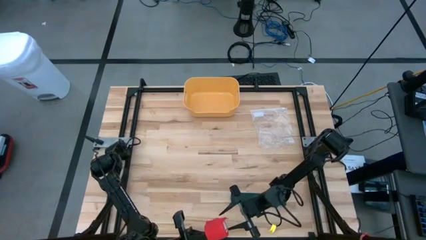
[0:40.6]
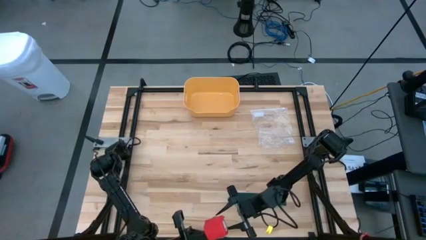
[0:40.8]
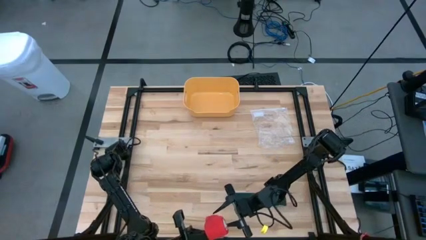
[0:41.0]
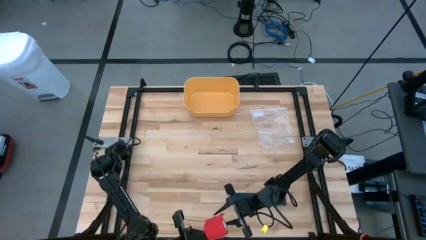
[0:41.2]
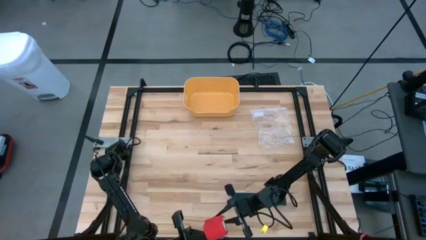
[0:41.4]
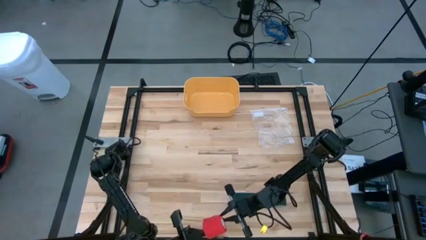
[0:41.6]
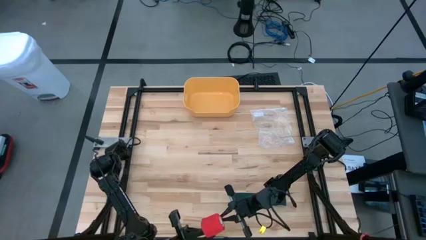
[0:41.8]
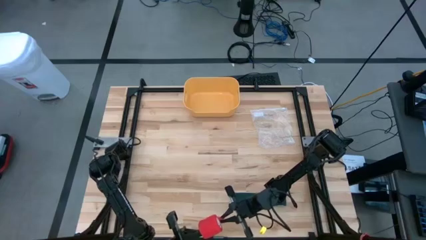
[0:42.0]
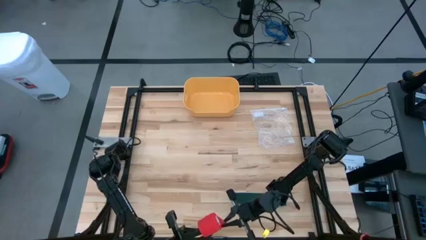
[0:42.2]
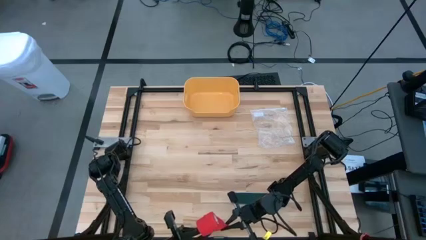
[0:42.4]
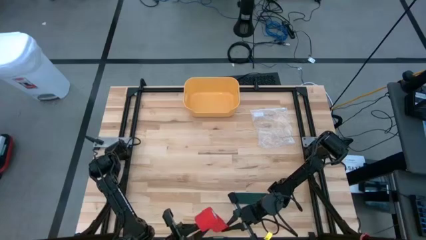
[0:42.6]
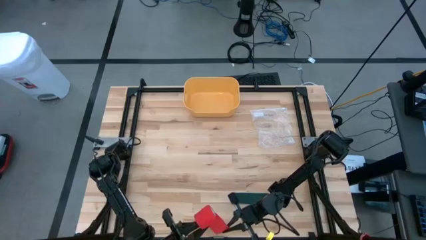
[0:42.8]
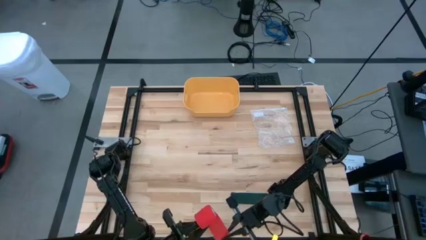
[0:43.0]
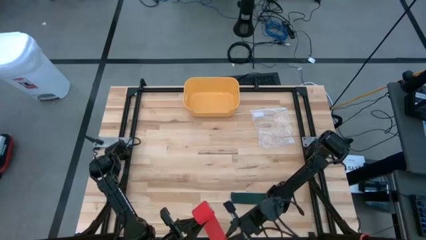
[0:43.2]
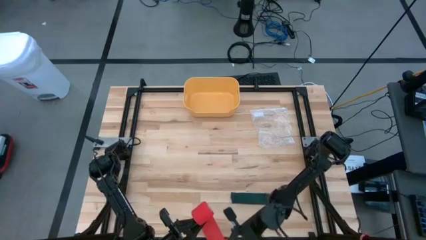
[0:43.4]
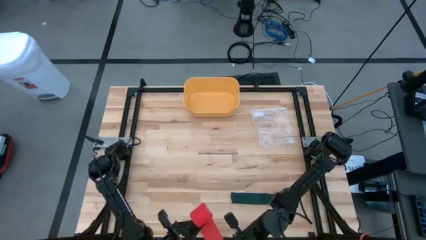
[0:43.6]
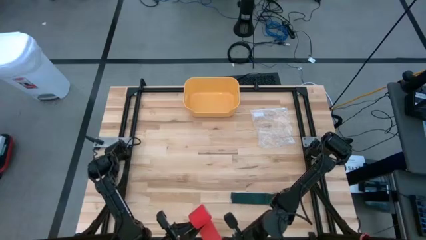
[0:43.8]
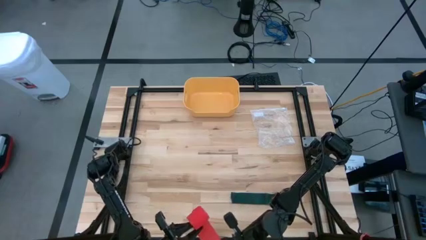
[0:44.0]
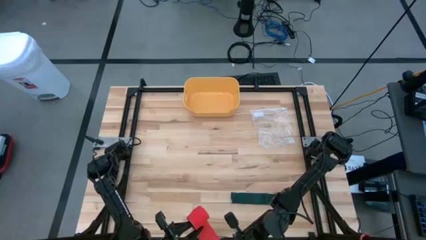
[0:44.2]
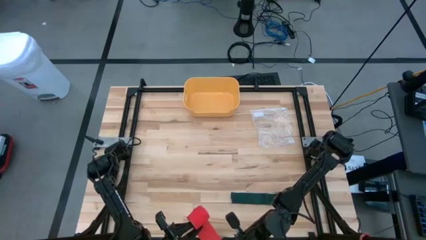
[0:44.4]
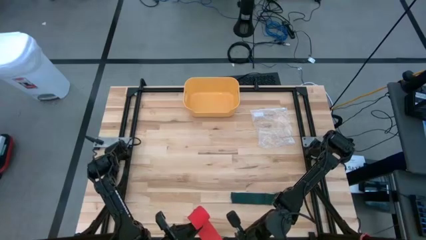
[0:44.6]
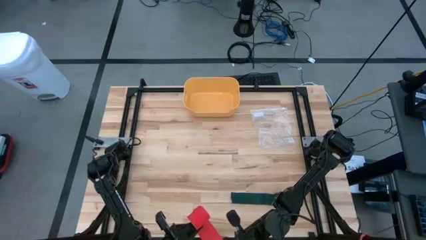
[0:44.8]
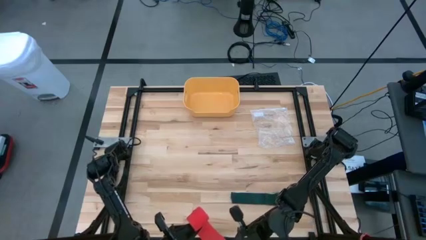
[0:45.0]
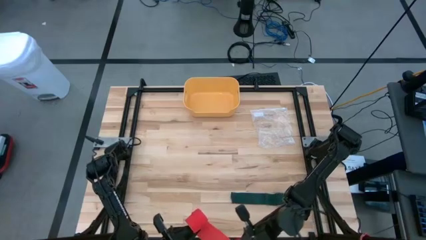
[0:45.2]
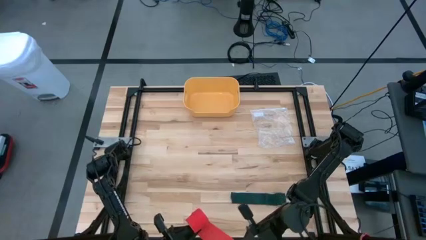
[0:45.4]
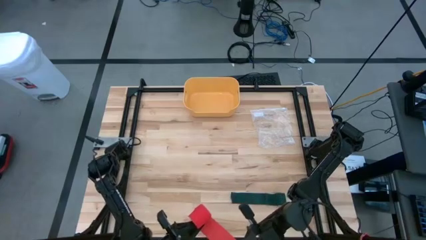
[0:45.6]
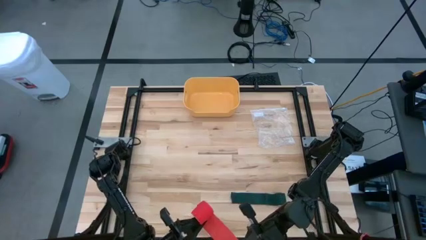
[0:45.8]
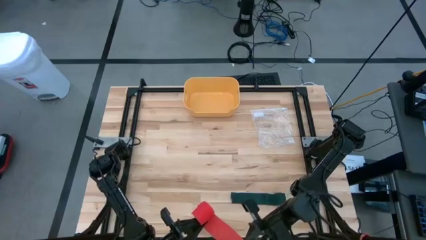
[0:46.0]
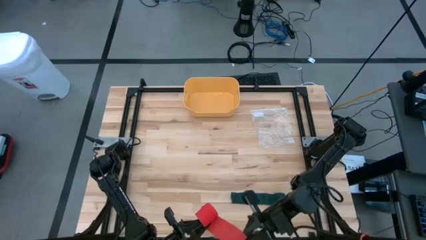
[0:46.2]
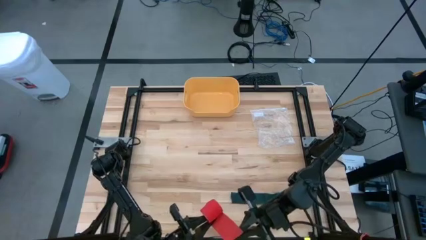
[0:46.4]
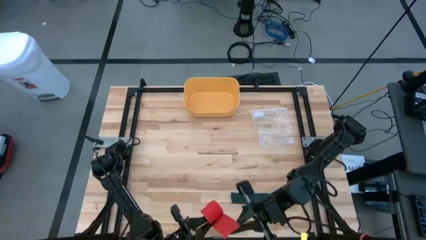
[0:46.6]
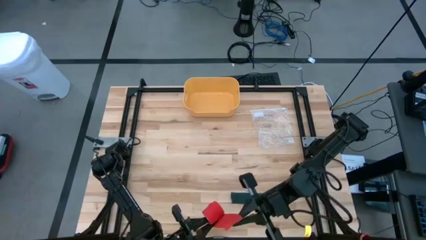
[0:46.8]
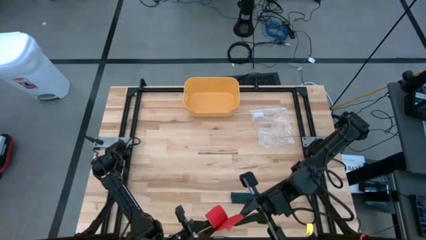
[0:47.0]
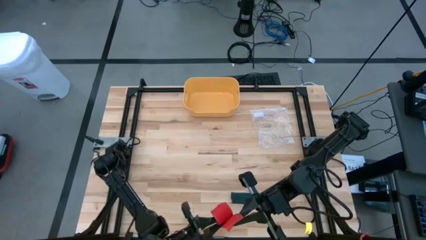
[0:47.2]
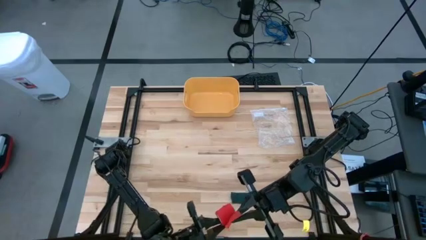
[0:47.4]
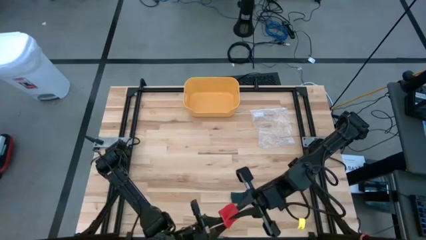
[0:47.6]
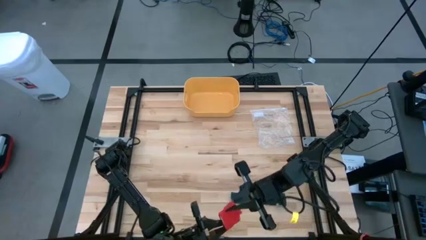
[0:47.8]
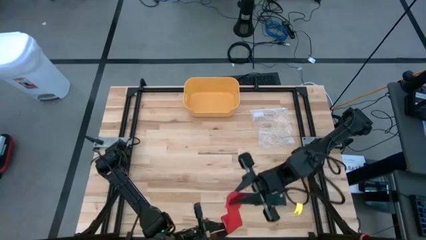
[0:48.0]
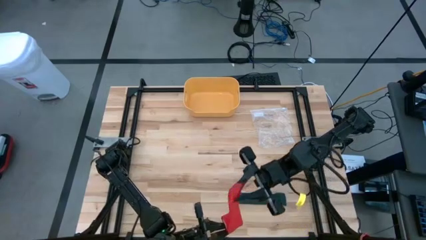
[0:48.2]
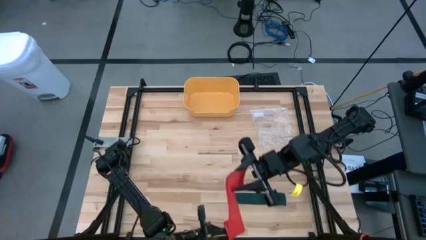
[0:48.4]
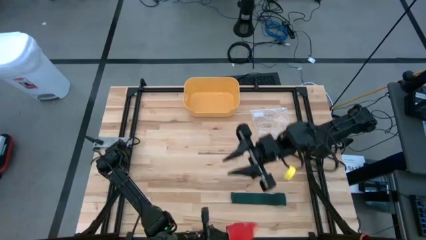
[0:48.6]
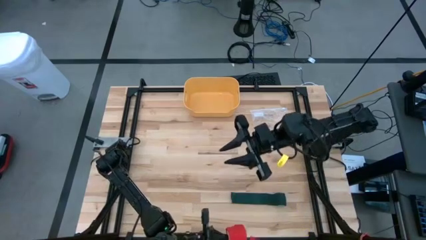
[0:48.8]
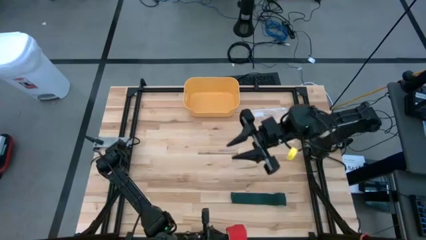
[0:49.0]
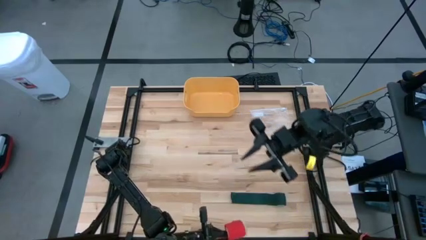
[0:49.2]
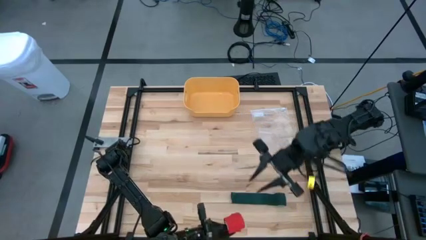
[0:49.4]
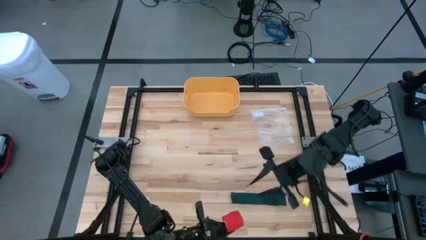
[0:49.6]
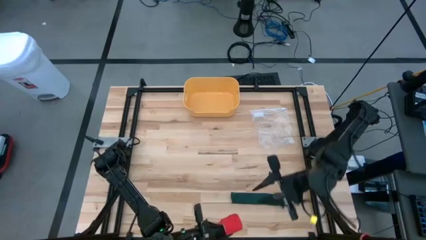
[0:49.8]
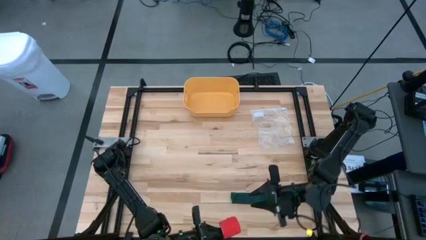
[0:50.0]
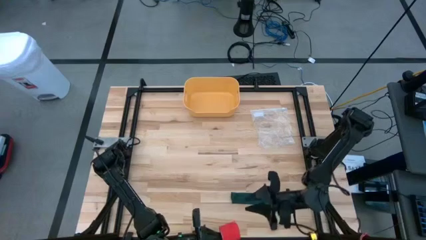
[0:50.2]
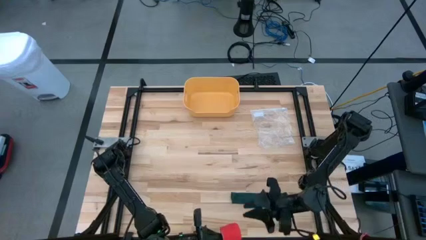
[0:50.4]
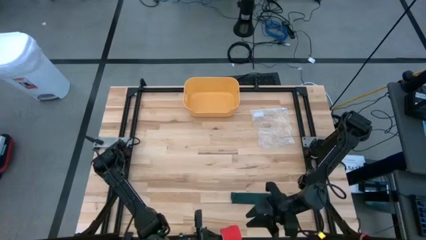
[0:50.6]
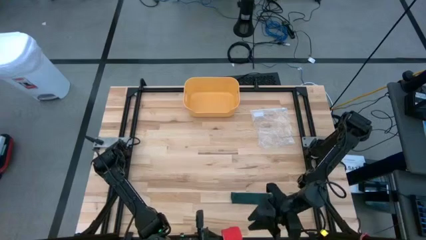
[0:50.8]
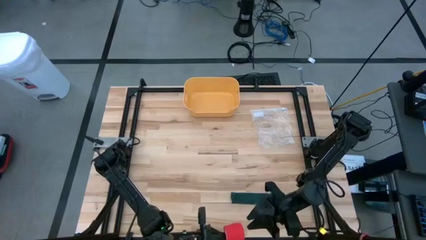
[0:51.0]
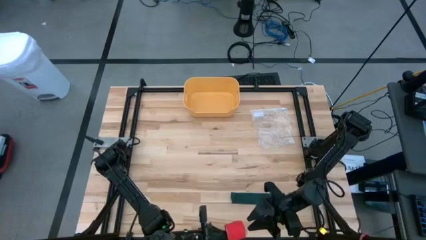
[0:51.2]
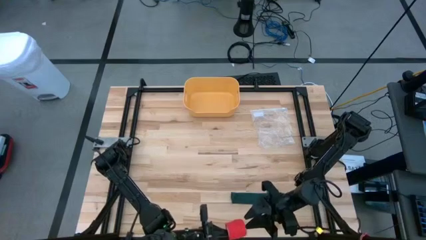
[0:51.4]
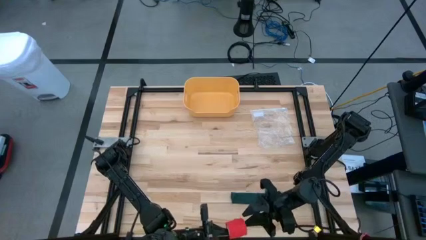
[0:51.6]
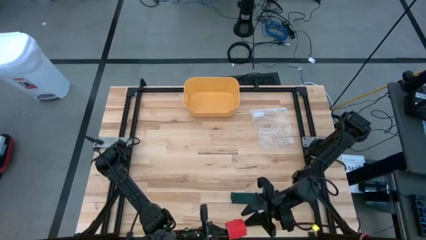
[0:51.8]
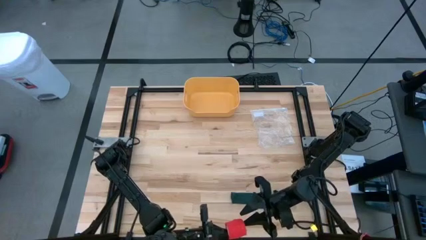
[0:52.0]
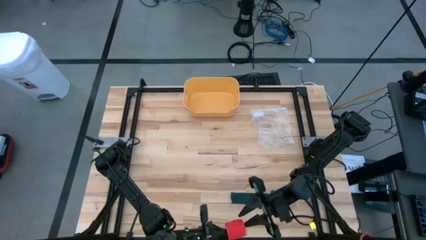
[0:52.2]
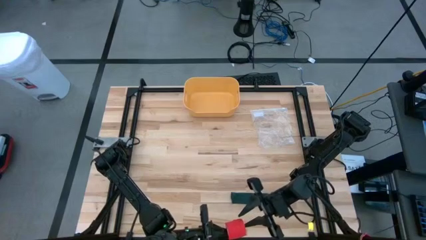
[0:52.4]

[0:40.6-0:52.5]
Task: Roll bandage
Roll the red bandage

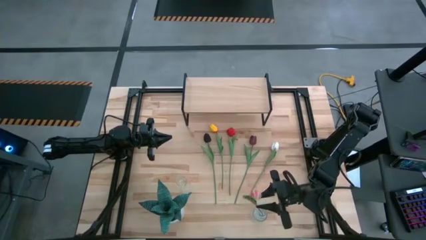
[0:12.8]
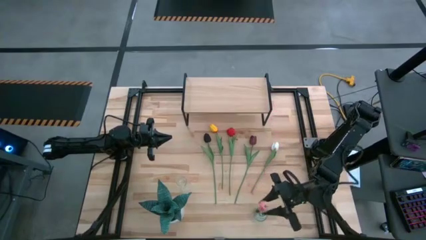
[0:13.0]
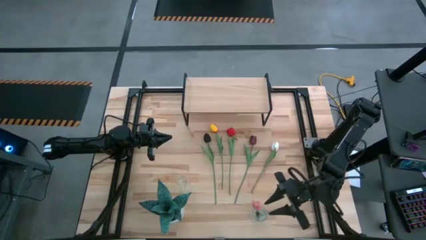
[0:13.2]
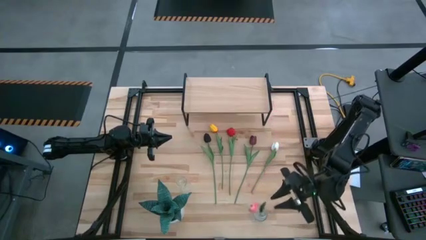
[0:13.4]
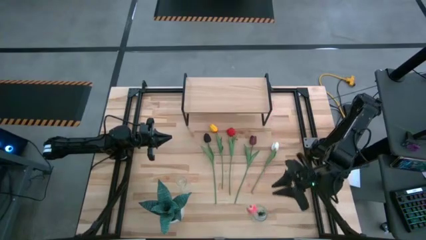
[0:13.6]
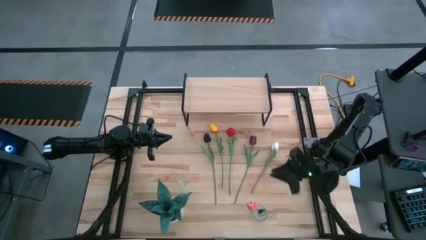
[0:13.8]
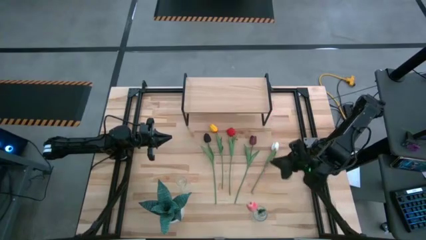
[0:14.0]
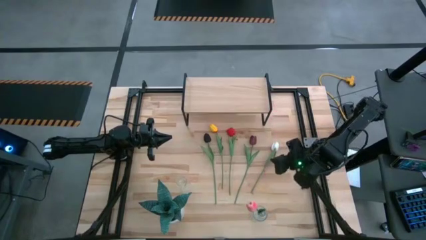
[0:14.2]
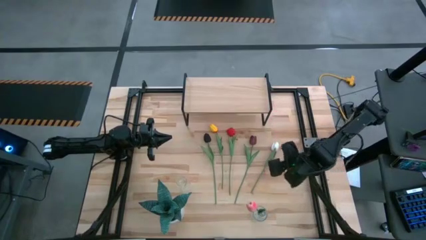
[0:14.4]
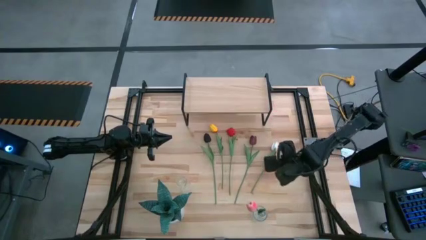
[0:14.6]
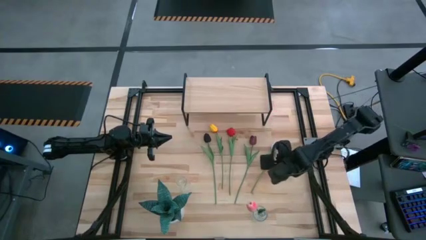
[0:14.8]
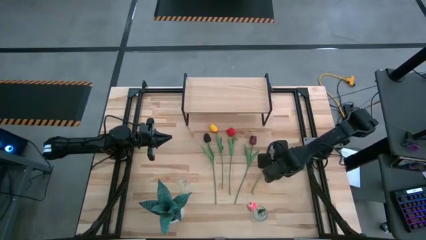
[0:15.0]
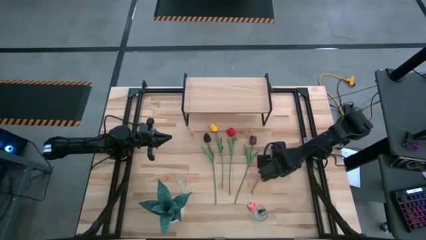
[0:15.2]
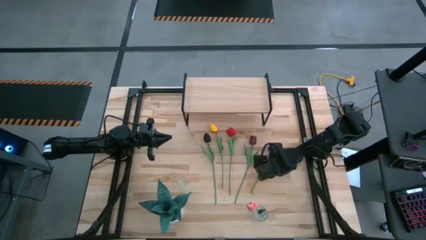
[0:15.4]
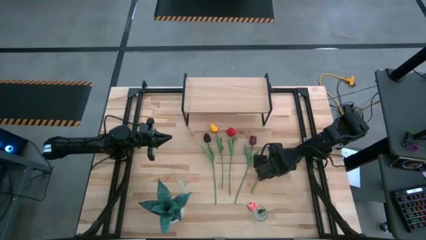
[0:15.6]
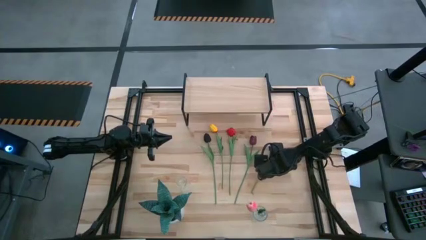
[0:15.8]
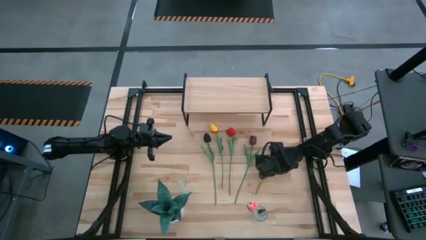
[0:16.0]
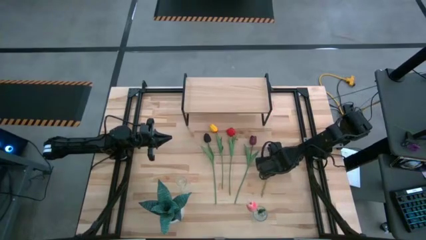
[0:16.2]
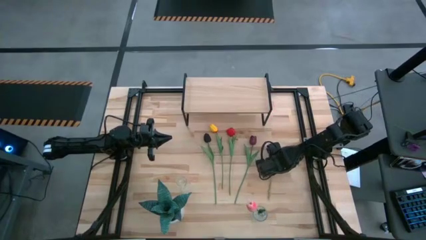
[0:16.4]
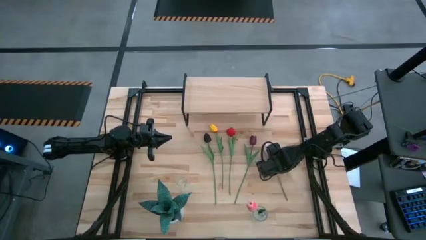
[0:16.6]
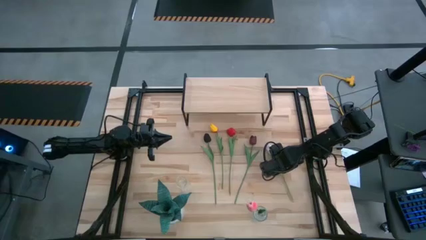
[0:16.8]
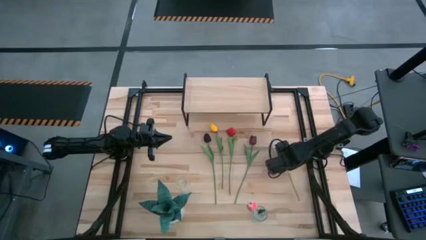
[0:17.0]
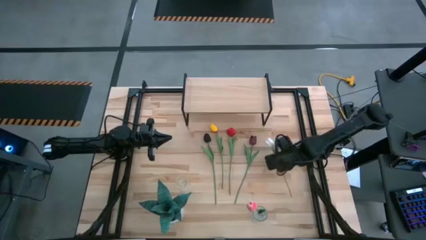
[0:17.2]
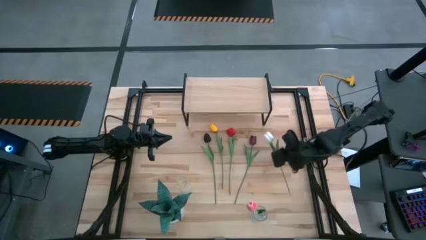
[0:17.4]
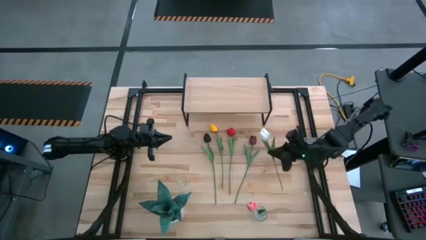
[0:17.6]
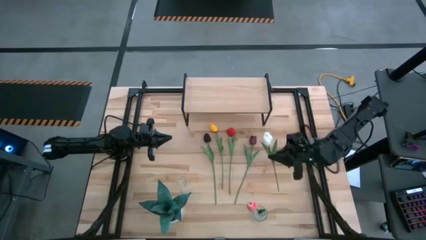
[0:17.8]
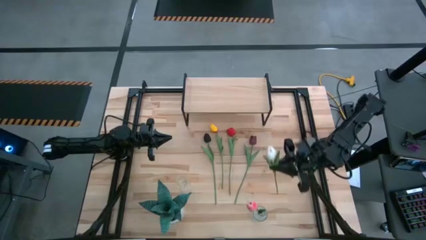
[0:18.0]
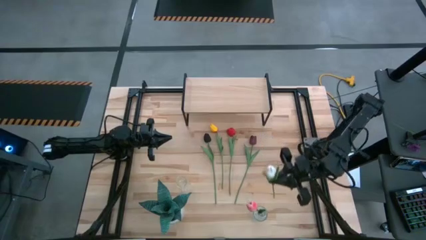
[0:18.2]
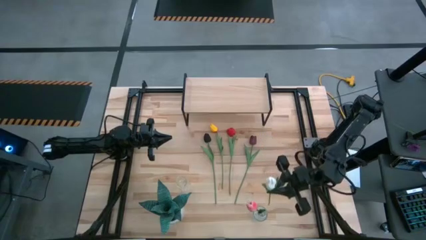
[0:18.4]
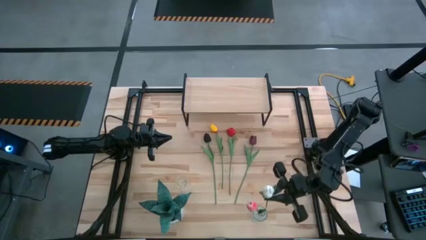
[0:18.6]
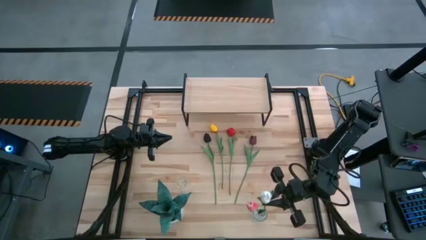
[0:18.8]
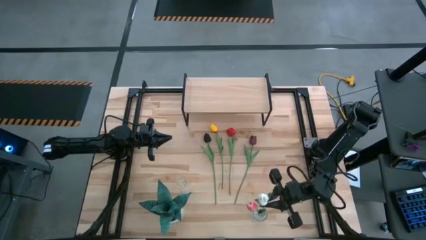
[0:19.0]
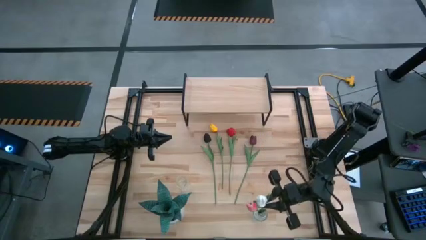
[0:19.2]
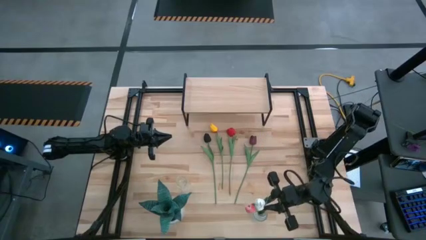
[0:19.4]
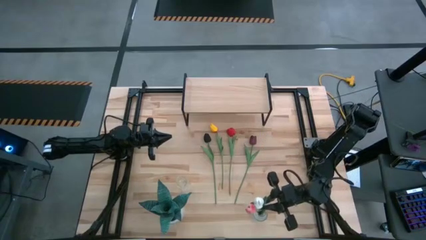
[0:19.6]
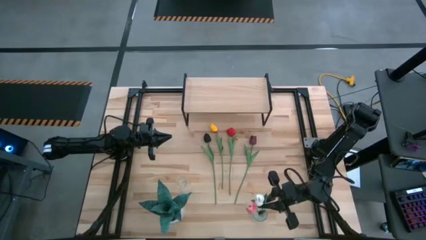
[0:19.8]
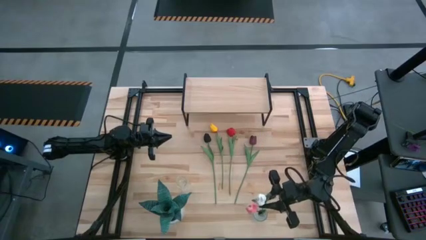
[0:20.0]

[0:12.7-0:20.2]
Task: Pick and place flowers into a vace then onto a shelf
Put the white flower into the bottom transparent vase
